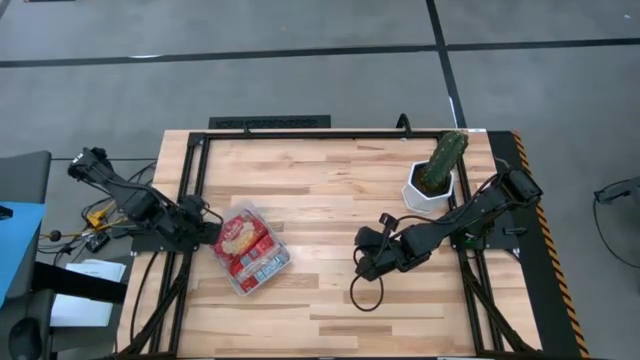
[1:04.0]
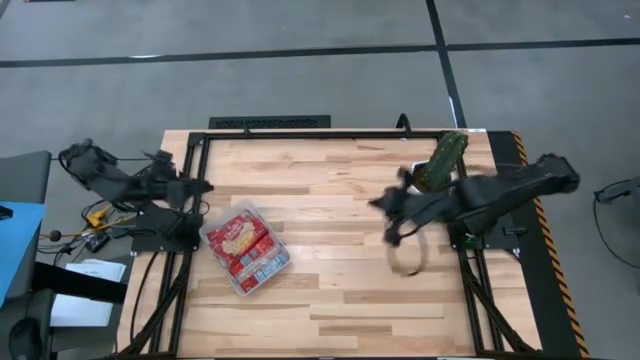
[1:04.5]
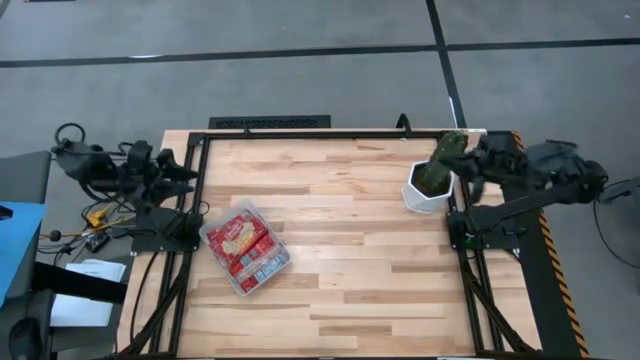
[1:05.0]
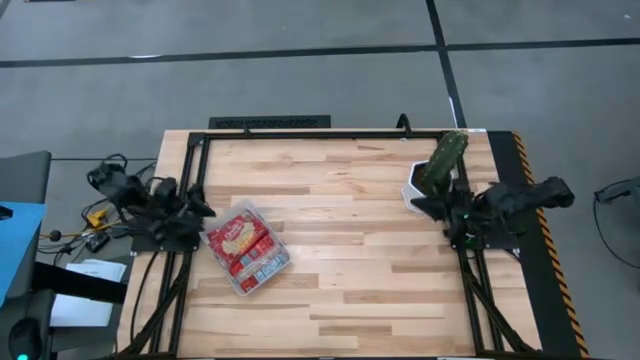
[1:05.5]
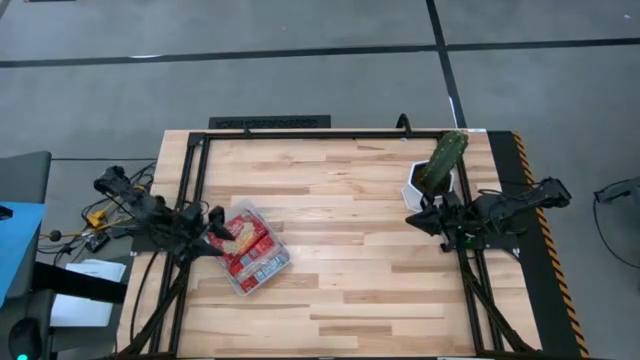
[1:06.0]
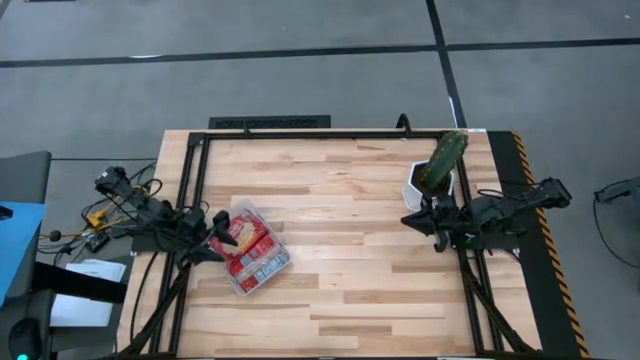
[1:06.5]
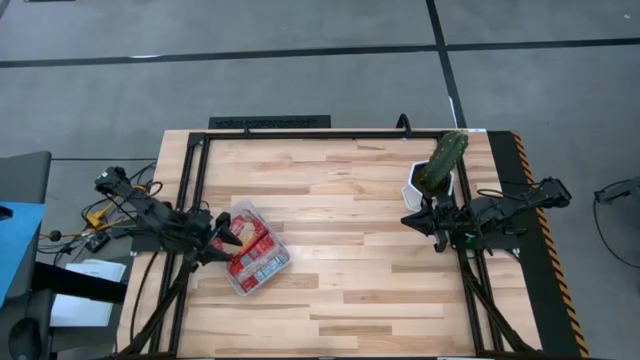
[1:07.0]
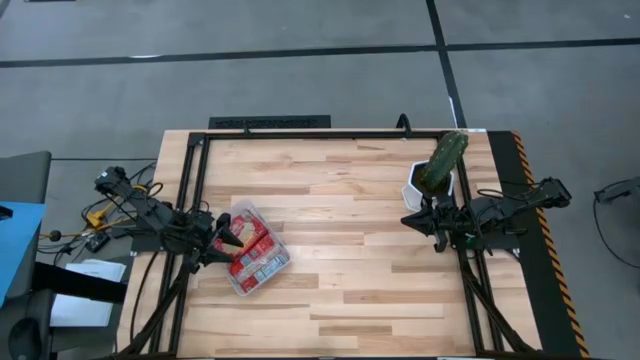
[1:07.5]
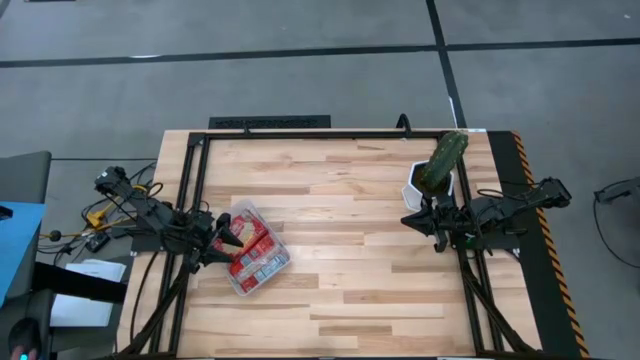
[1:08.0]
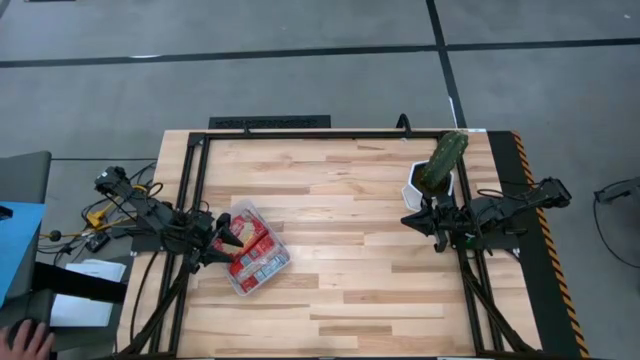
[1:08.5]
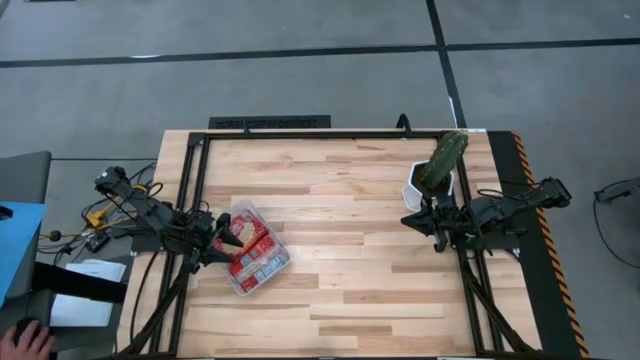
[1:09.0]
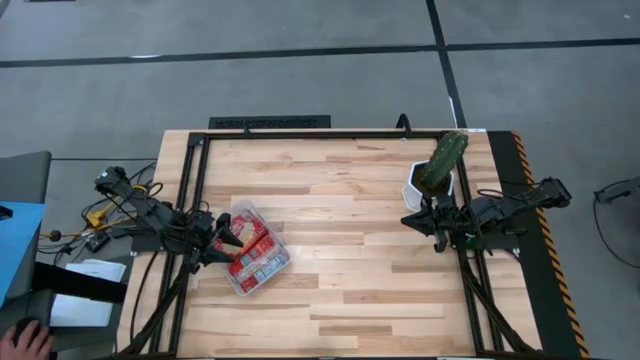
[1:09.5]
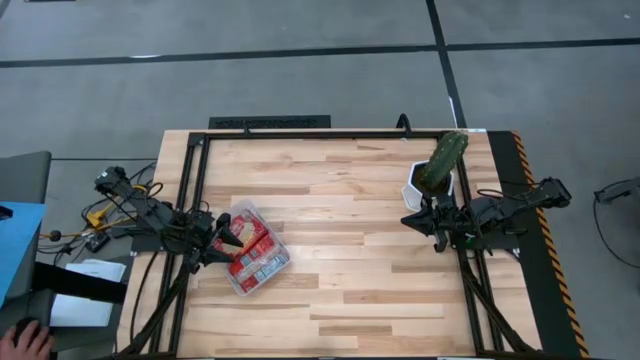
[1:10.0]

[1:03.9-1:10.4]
Task: Sort popcorn bags into baskets
Return to Home Position

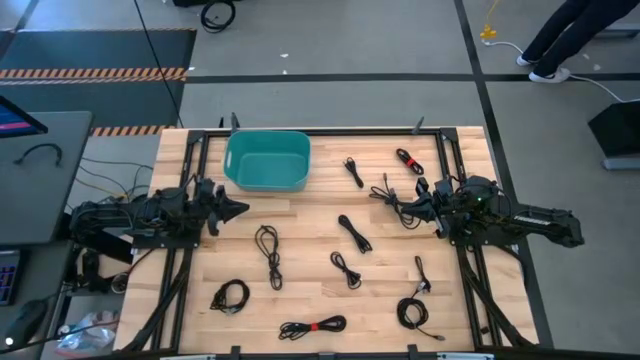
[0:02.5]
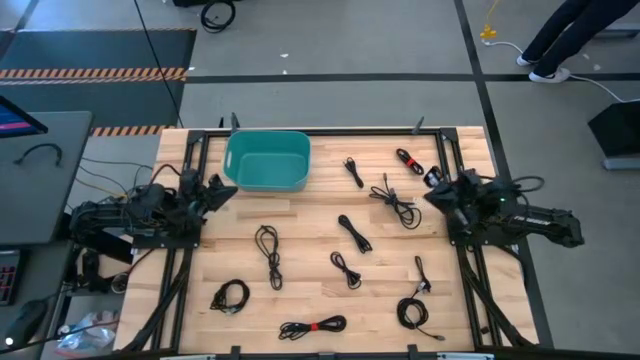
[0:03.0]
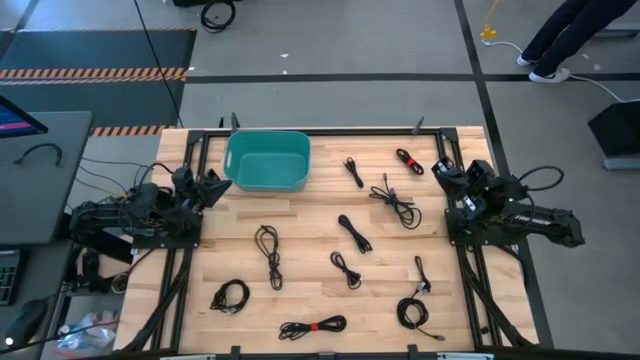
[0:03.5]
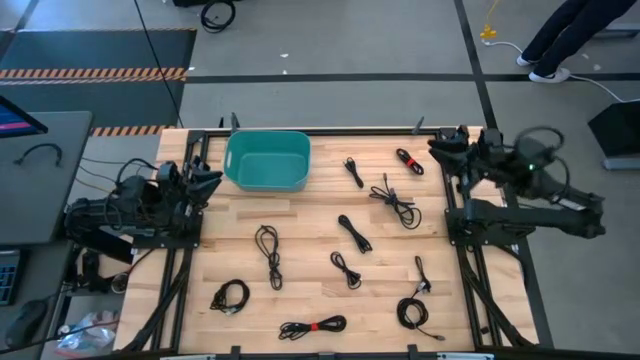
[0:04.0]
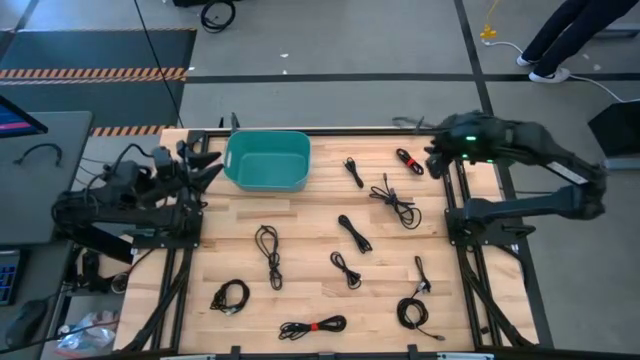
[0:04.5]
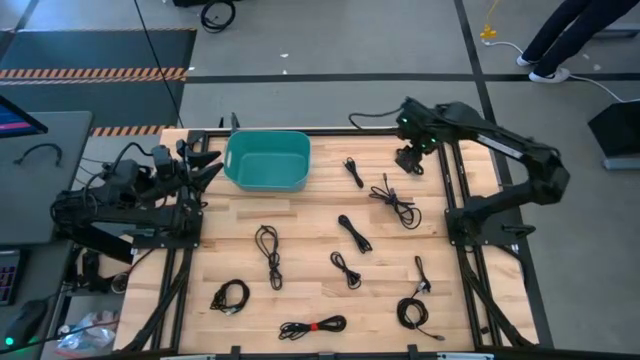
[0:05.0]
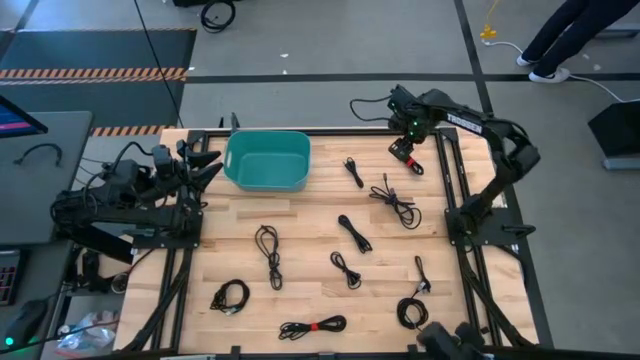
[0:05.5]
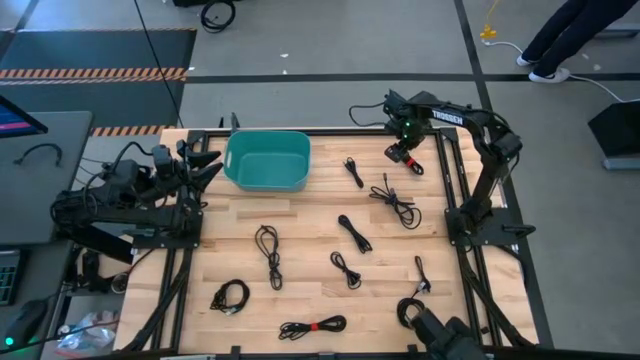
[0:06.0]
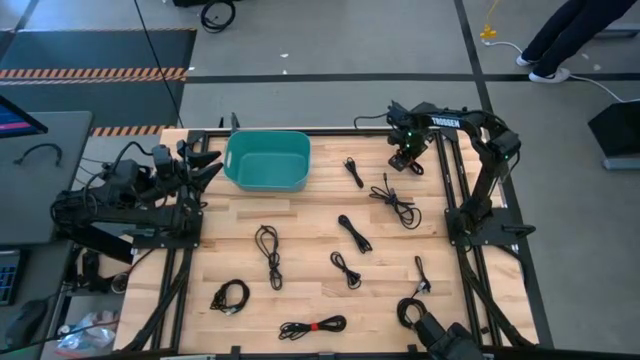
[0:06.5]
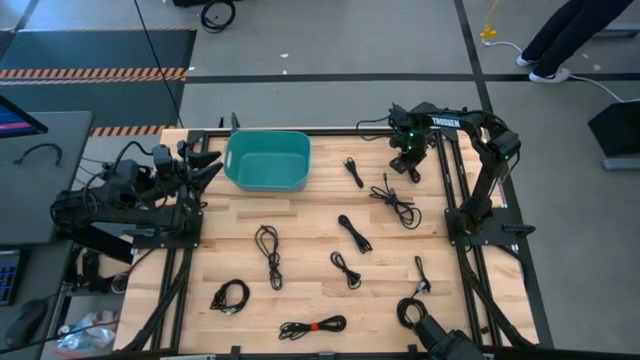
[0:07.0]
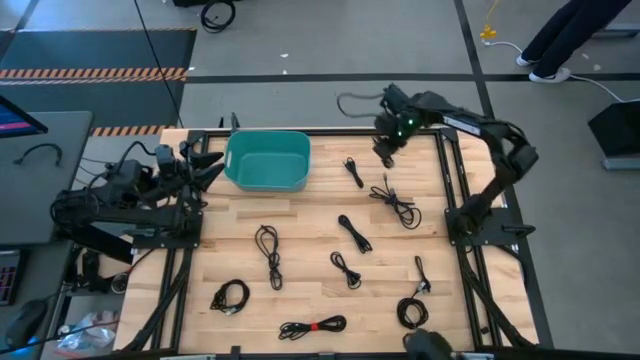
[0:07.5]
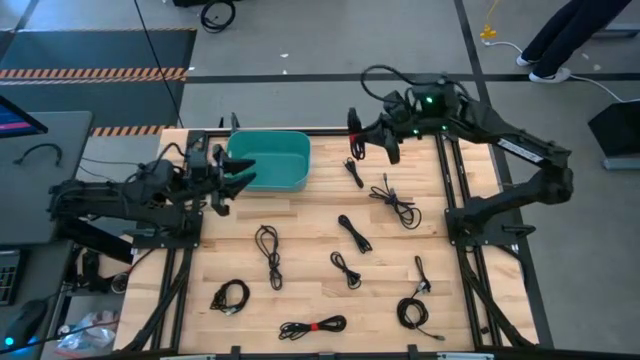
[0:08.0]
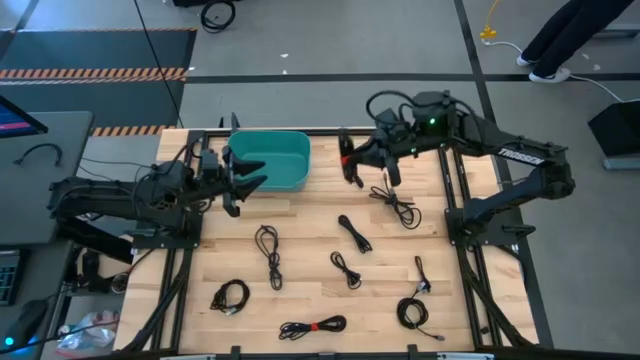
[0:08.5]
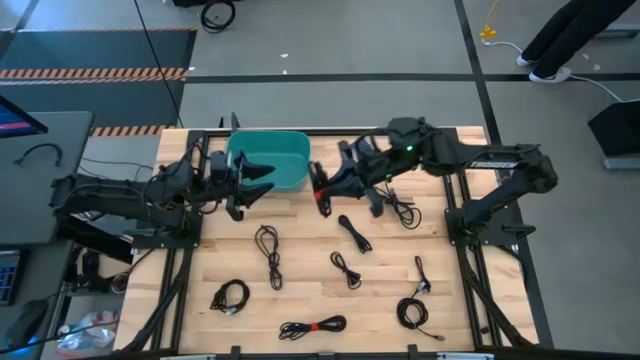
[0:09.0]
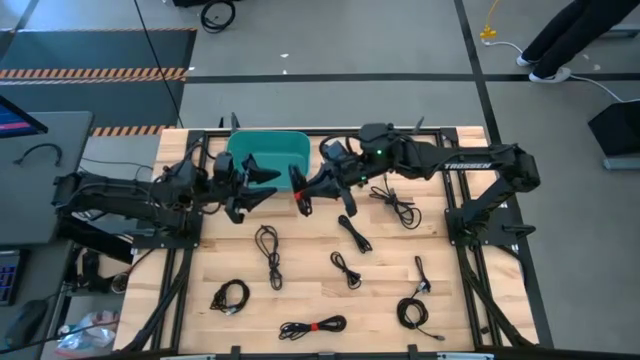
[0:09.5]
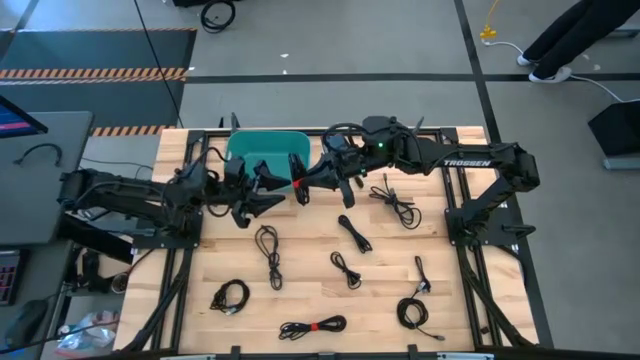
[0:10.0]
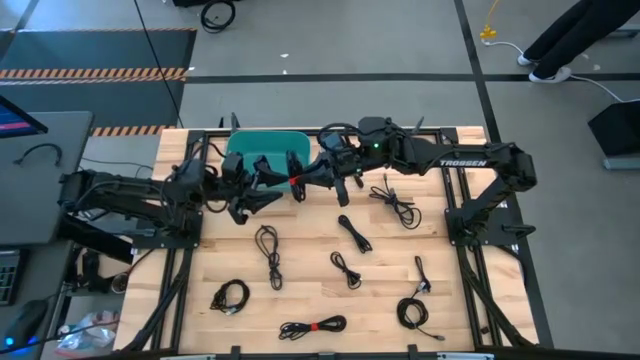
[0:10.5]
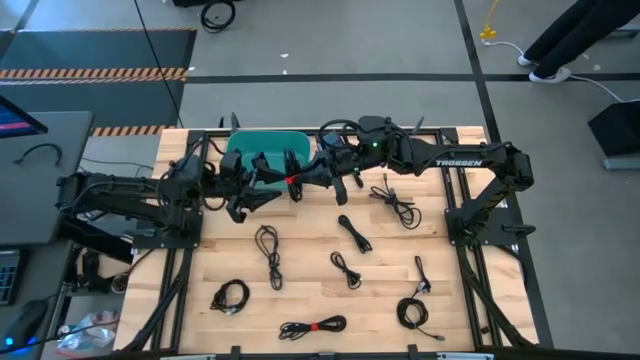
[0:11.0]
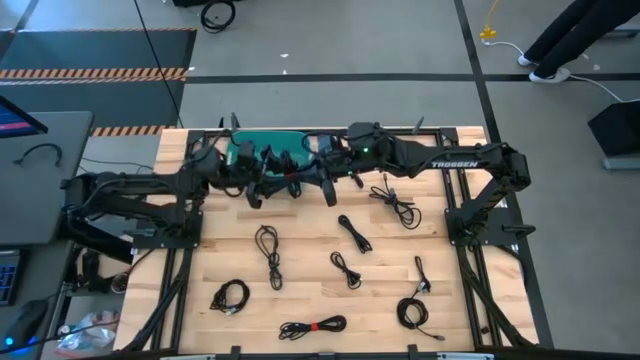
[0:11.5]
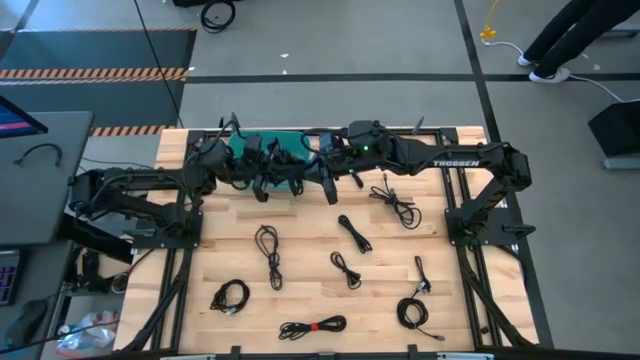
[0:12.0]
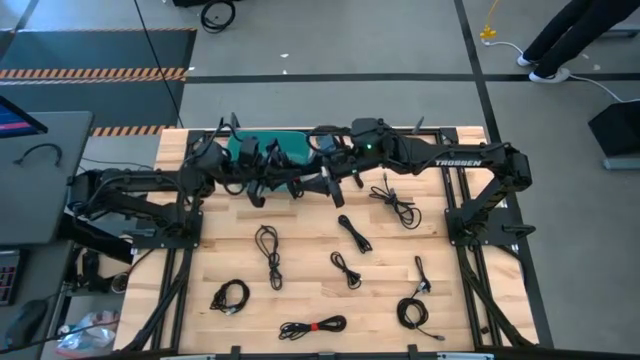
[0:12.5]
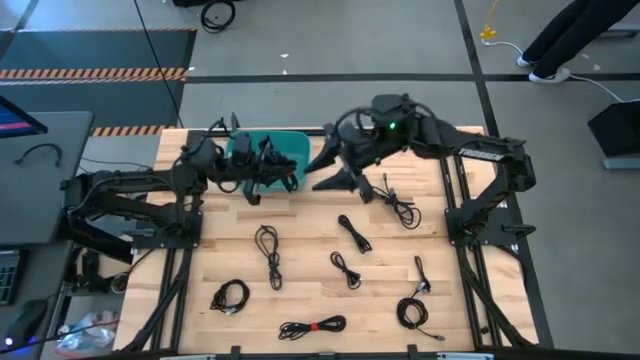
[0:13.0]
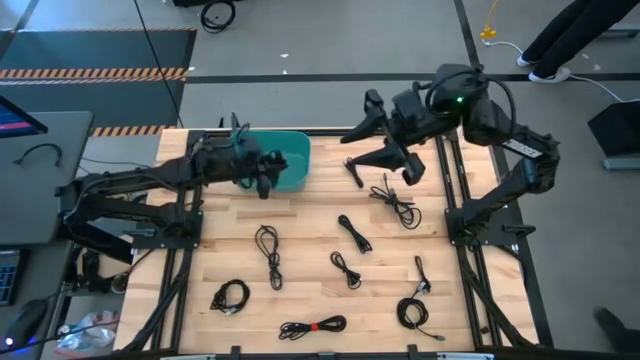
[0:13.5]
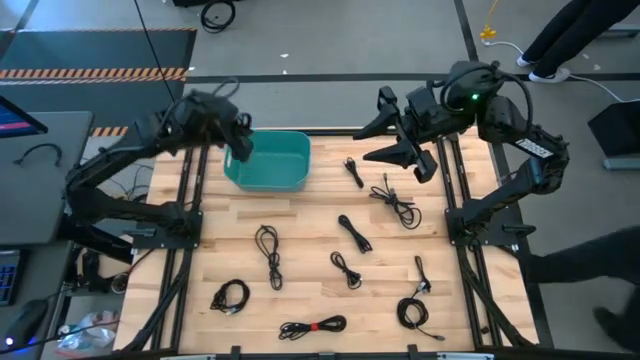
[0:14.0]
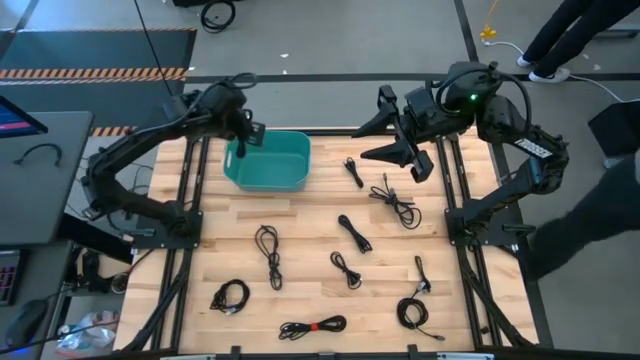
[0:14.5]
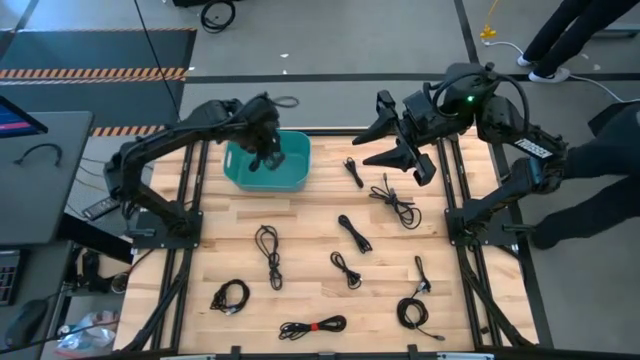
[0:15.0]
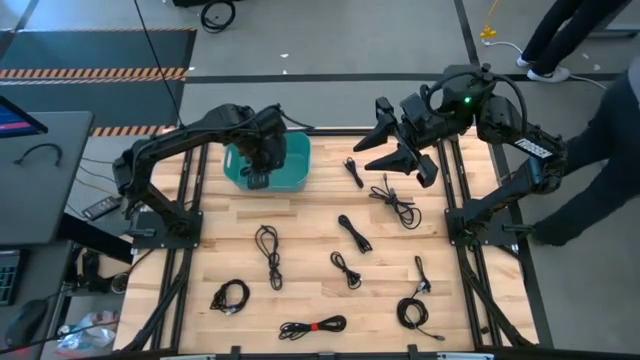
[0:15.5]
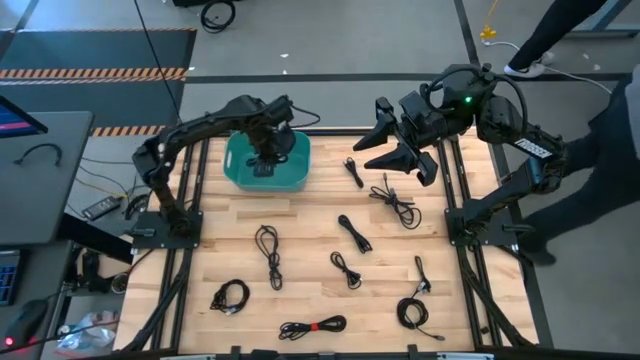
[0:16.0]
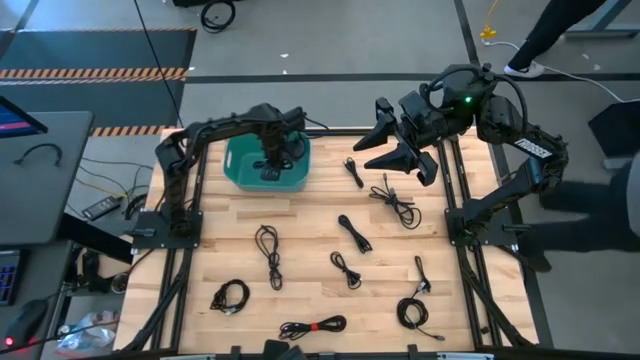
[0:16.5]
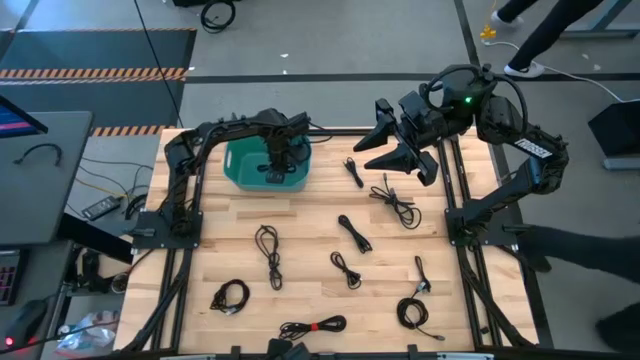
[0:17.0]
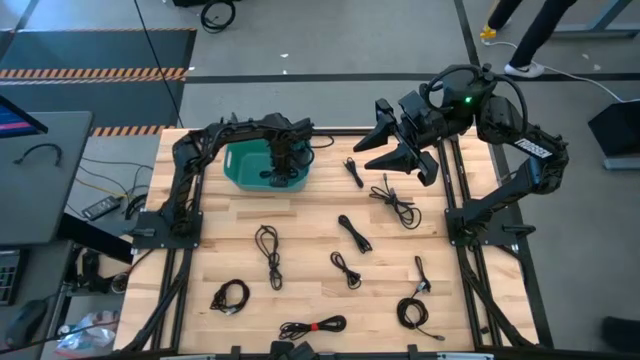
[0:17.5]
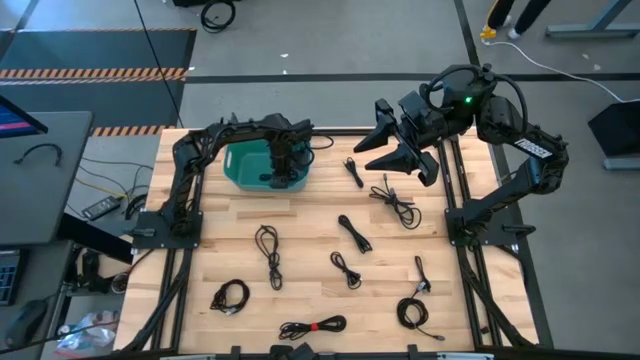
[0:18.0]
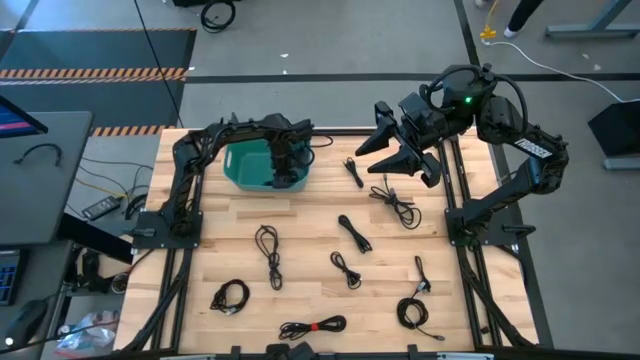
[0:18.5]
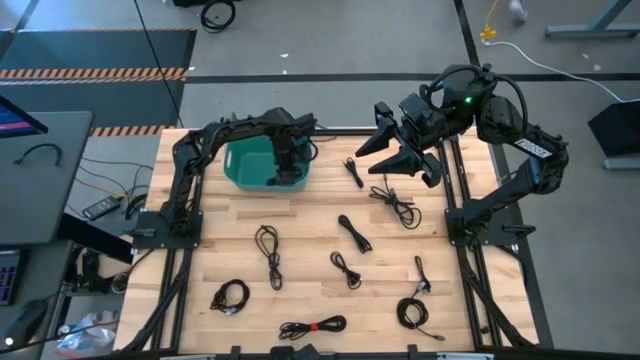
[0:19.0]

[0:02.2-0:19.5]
Task: Pick and place USB-C Cables
Put the black charger cable into the green bin
